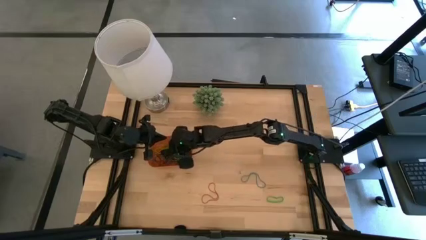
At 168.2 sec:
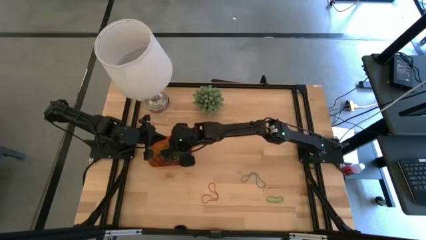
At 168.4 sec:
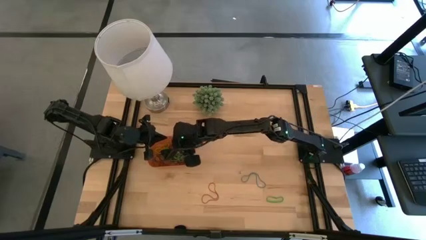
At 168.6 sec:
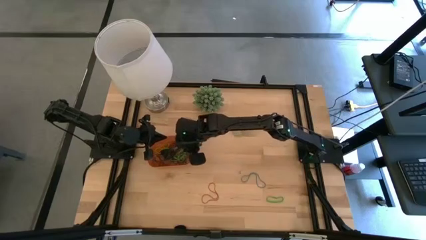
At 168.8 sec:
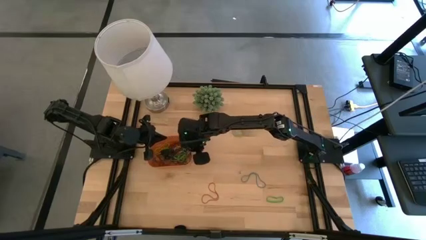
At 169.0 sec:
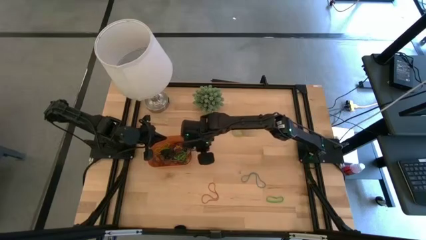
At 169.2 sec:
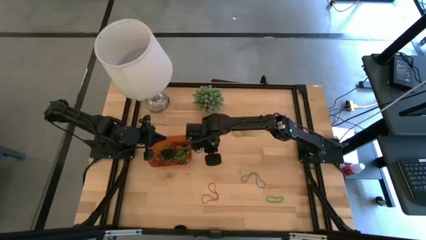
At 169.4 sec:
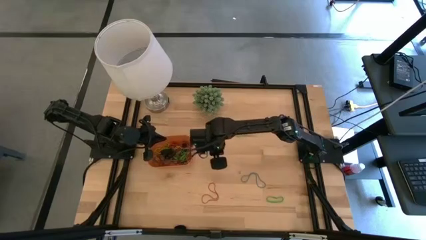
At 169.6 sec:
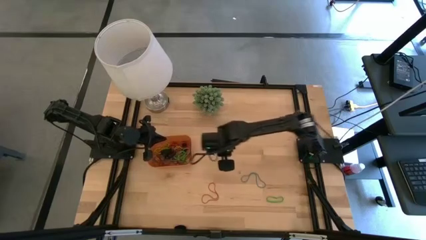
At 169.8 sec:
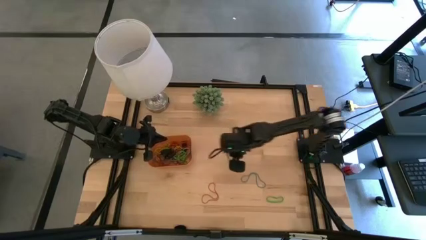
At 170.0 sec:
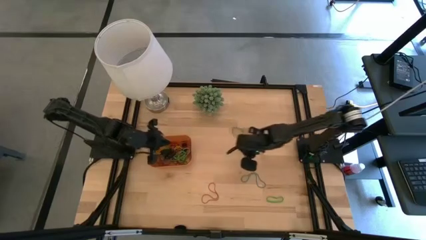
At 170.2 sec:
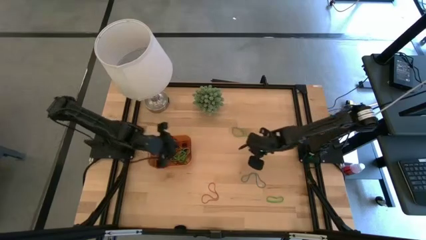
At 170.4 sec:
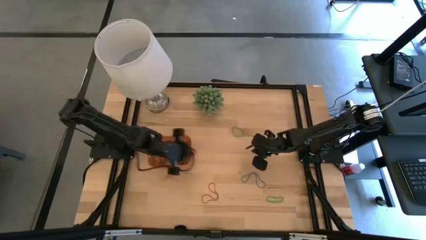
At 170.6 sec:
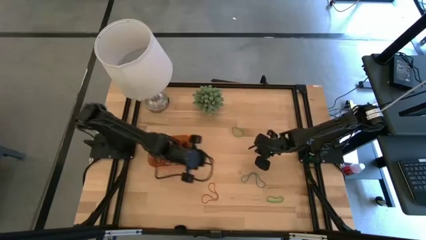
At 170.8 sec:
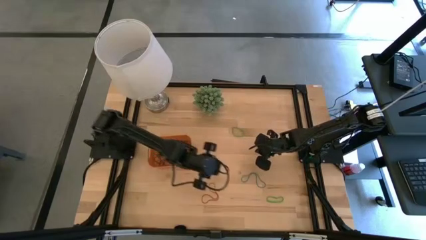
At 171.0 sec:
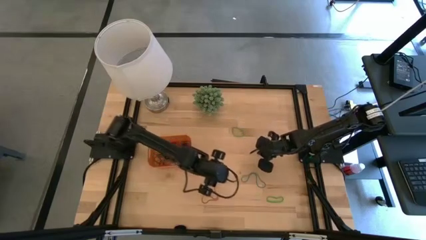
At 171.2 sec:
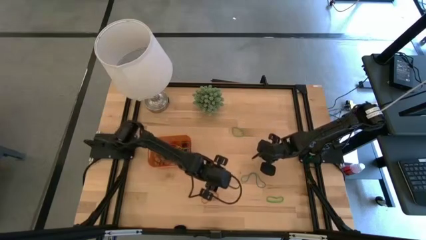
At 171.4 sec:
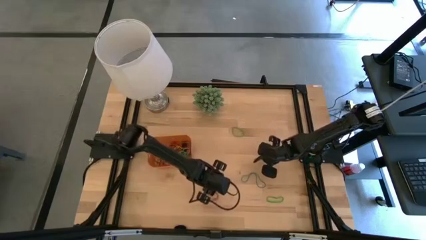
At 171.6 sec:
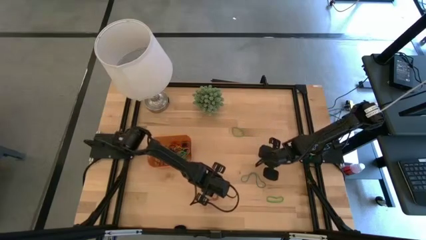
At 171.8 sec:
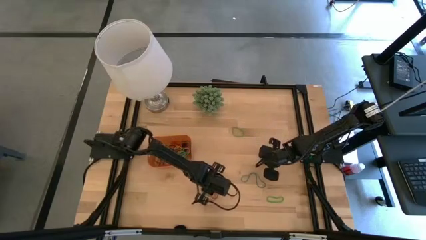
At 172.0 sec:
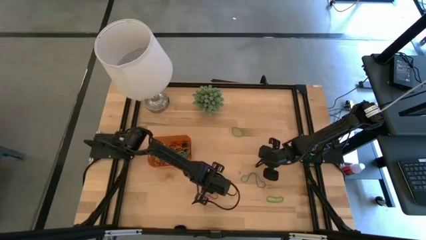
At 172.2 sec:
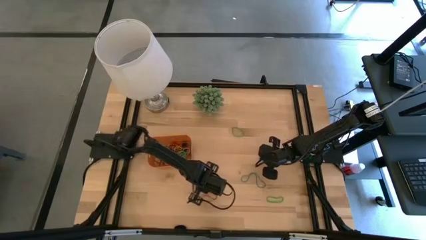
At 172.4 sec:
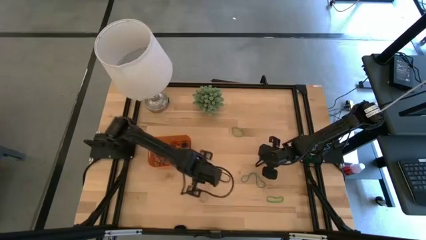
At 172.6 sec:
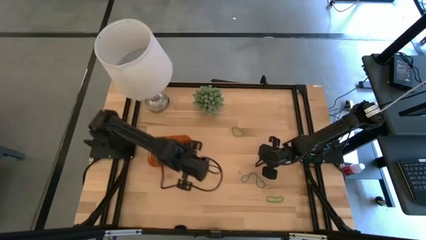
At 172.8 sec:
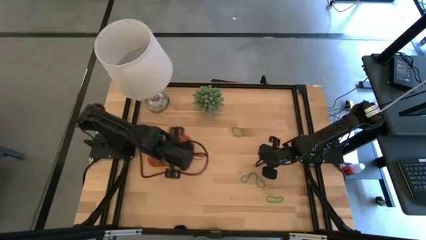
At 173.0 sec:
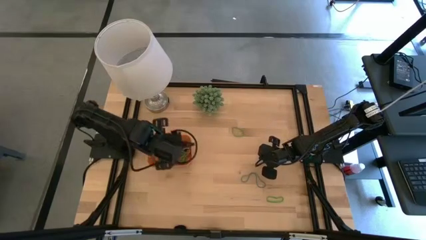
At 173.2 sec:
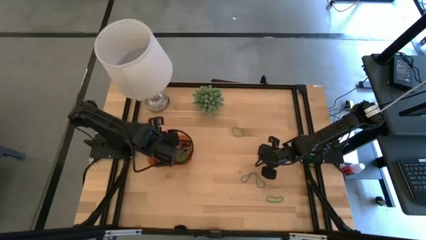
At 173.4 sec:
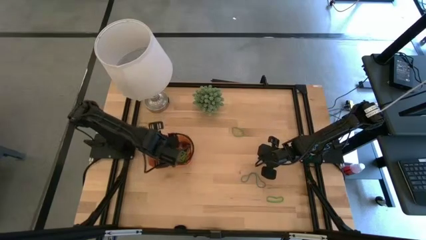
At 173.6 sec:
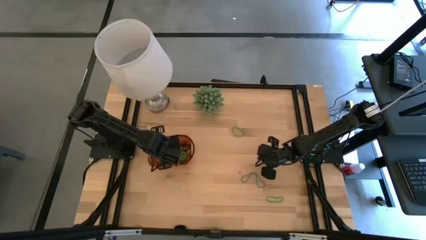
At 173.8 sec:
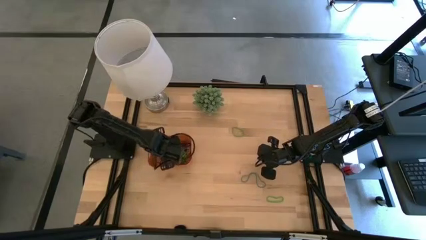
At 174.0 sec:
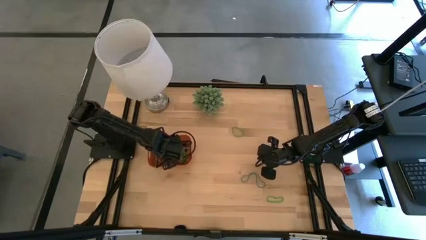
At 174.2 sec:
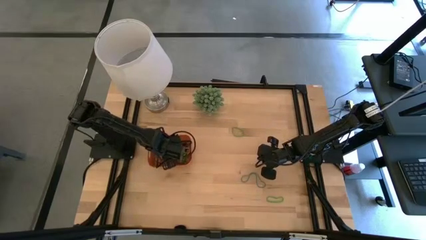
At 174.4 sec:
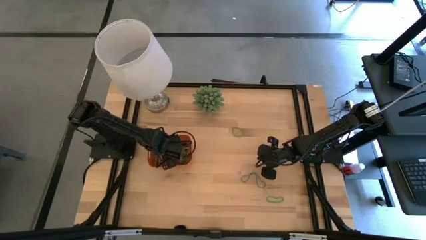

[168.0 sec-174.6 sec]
Task: Pick and place rubber bands into bin
Put the red rubber band into the orange bin

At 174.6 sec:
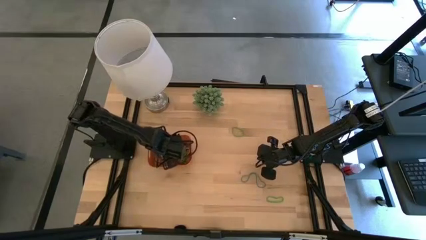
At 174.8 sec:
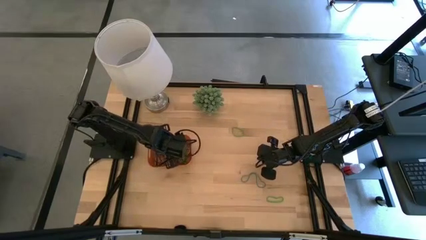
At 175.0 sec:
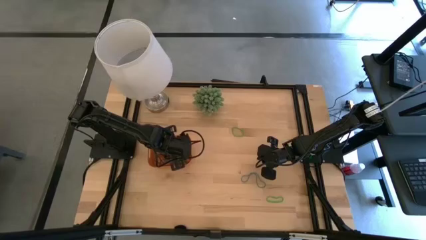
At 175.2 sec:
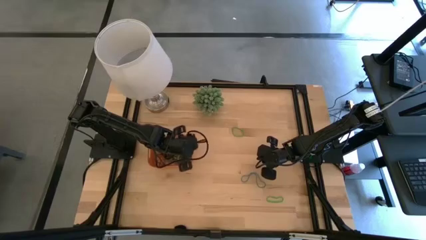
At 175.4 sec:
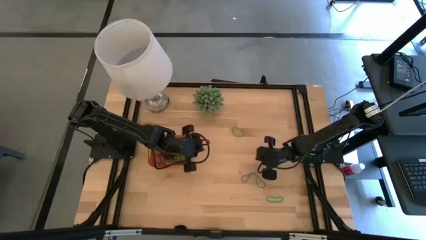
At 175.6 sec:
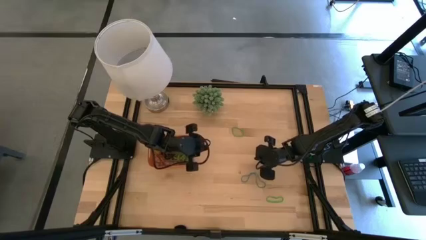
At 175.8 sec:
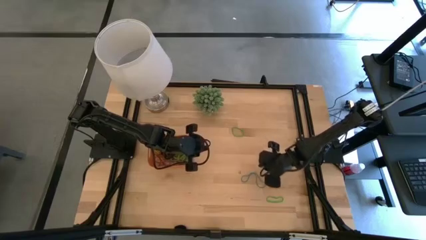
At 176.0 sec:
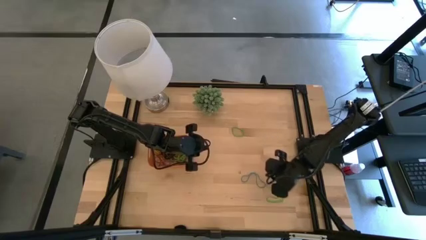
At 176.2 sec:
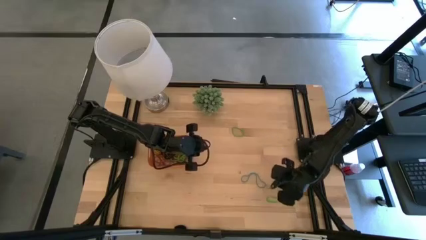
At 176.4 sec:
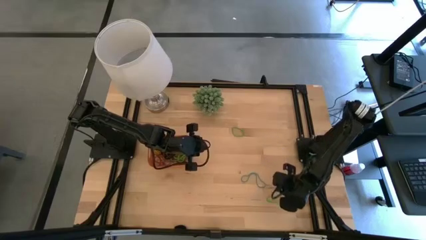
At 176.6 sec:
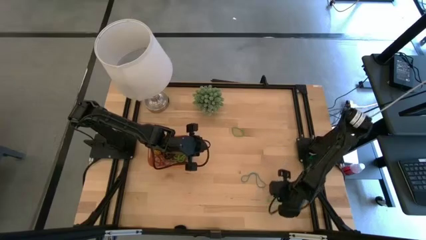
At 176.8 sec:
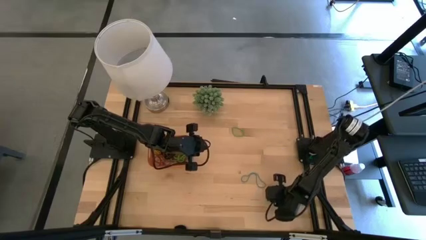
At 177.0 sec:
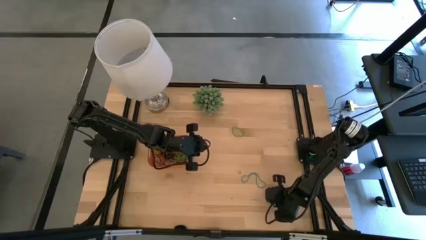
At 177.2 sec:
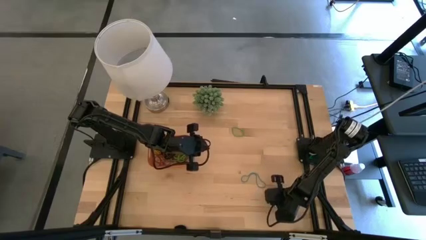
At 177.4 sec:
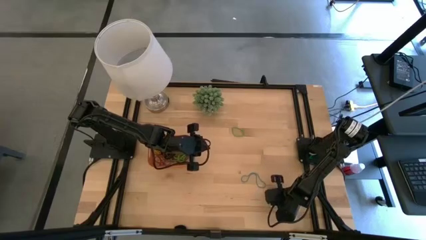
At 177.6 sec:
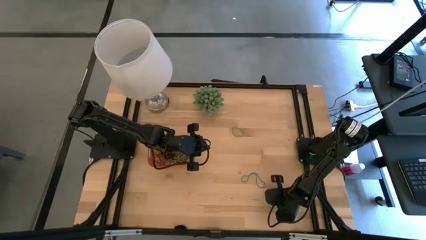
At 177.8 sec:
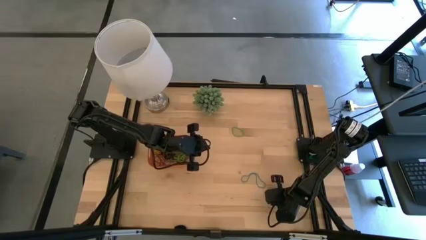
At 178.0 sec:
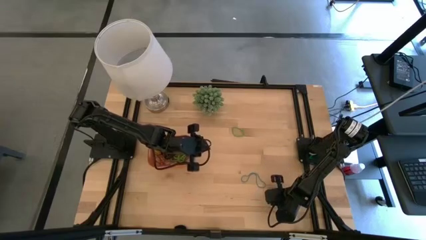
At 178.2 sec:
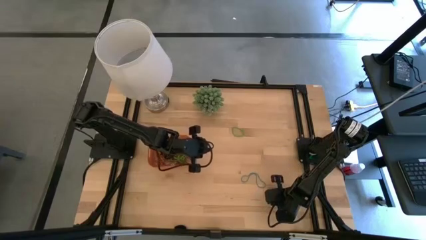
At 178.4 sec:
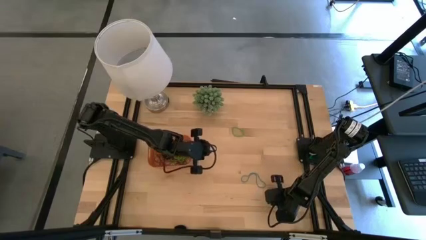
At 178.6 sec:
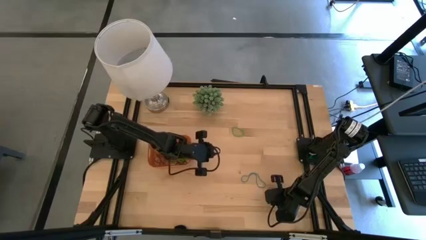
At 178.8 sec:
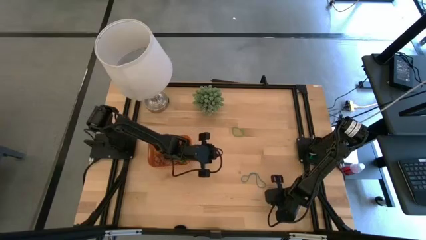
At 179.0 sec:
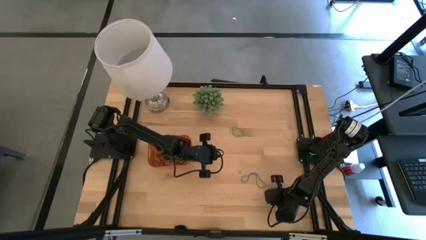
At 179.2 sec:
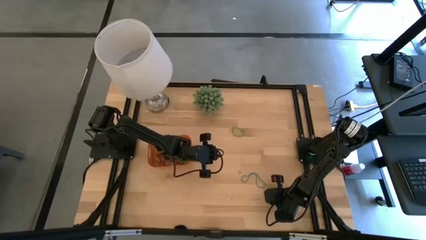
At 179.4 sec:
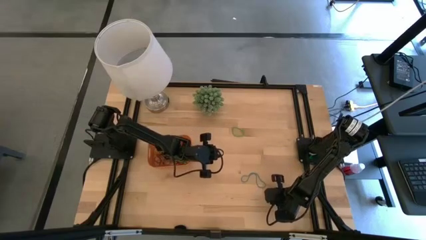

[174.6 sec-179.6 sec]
Put the green rubber band into the orange bin

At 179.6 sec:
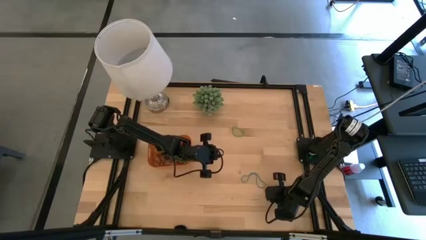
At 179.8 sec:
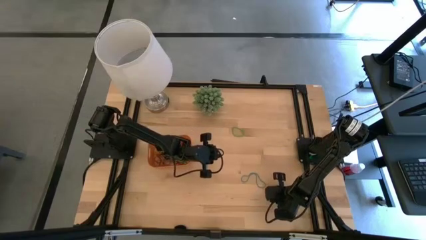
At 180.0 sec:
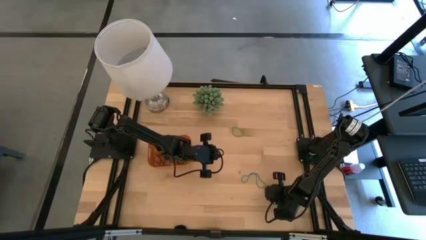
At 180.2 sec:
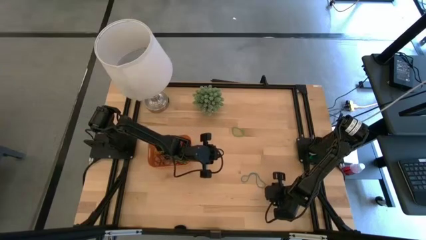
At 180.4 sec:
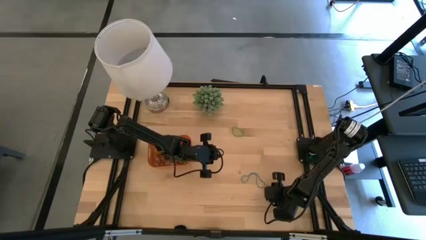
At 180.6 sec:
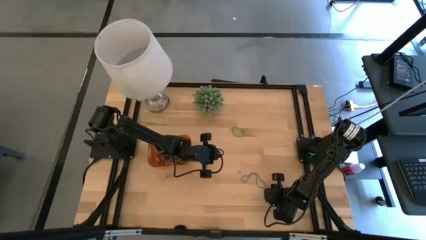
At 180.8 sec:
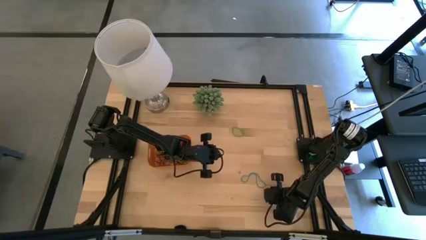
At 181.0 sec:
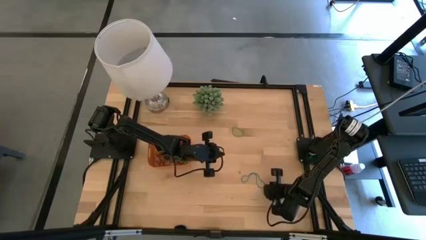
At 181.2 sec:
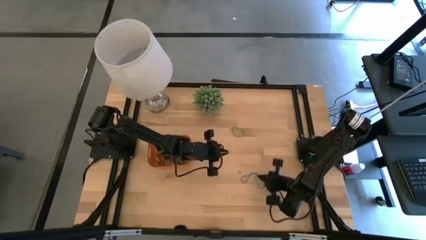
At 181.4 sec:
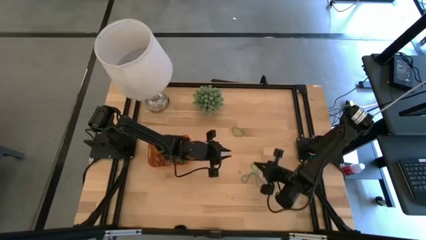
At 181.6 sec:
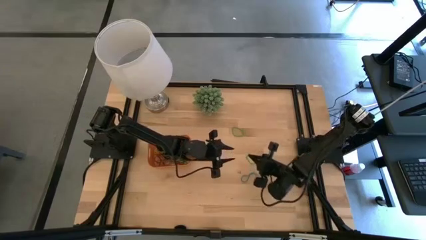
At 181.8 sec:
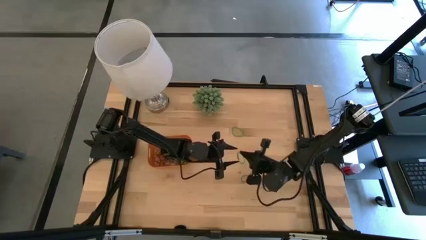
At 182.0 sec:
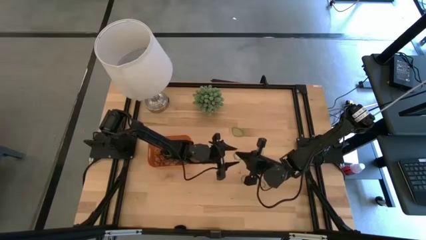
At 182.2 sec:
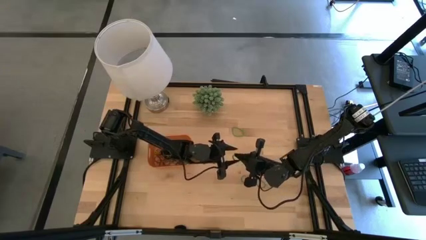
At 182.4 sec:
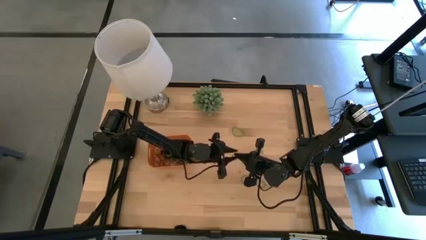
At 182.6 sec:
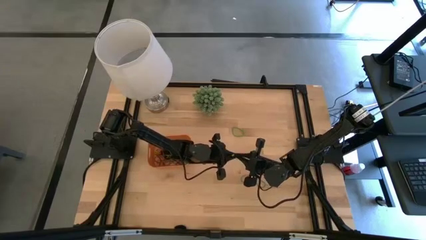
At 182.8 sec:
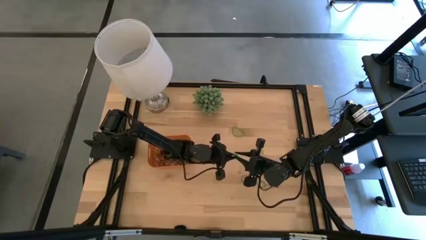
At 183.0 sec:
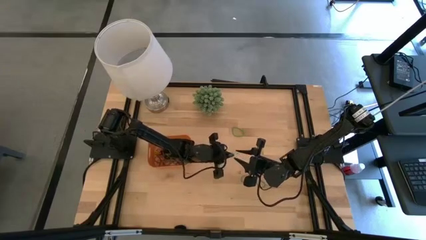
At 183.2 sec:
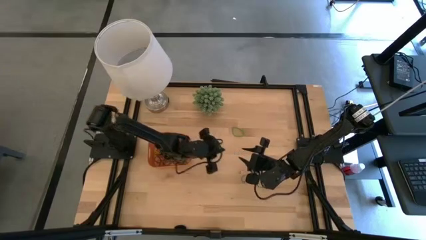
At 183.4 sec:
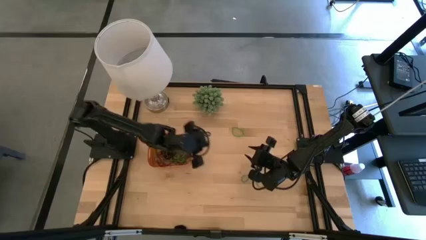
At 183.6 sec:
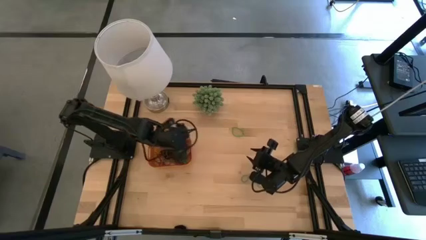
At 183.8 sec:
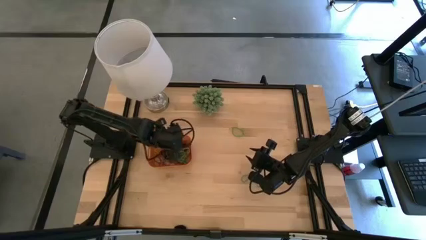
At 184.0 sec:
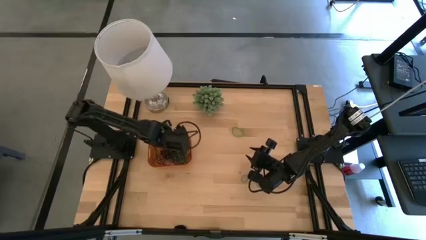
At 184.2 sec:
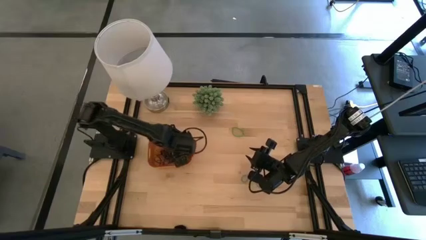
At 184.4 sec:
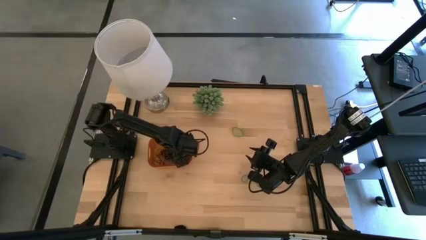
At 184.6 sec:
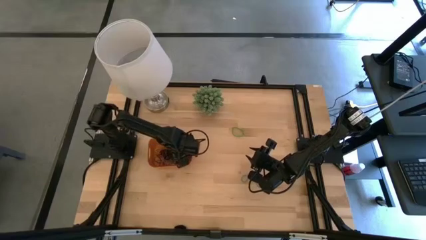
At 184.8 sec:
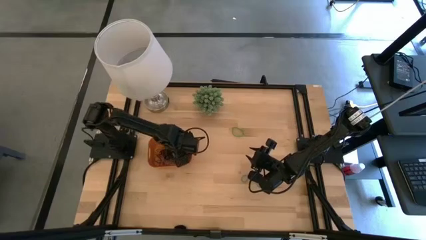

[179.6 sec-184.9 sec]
Put the green rubber band into the orange bin
